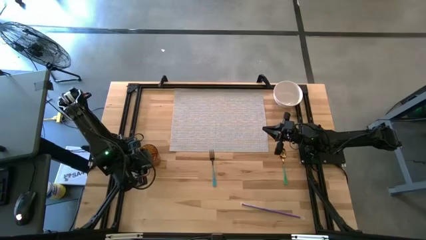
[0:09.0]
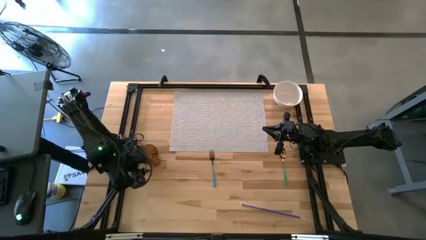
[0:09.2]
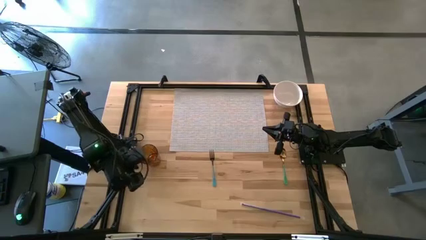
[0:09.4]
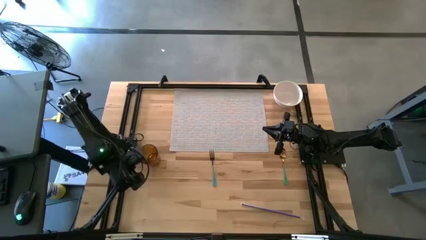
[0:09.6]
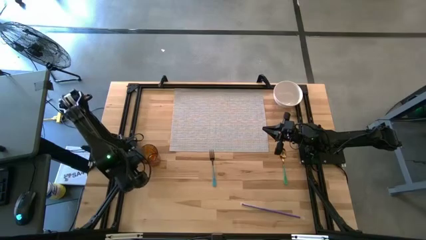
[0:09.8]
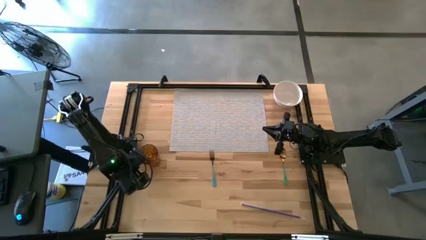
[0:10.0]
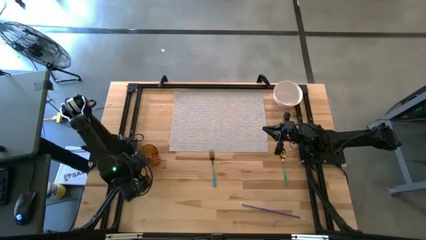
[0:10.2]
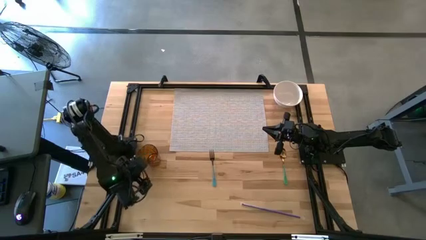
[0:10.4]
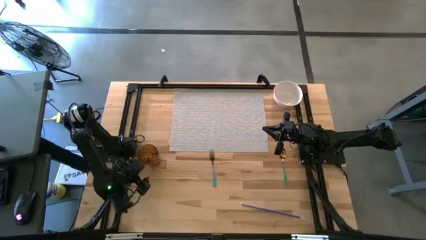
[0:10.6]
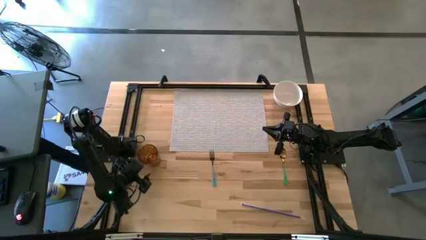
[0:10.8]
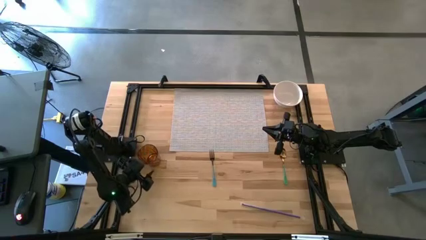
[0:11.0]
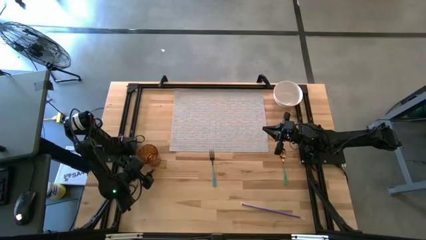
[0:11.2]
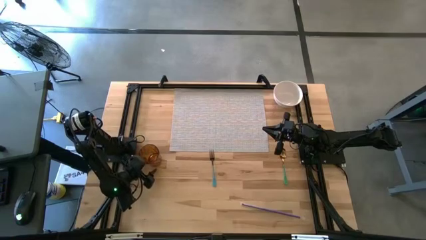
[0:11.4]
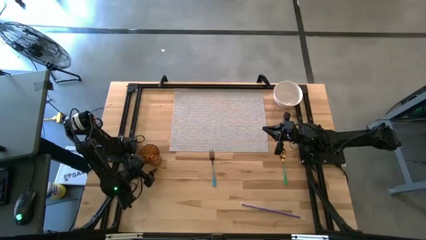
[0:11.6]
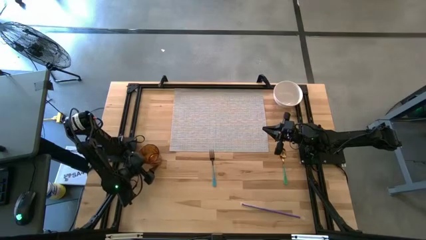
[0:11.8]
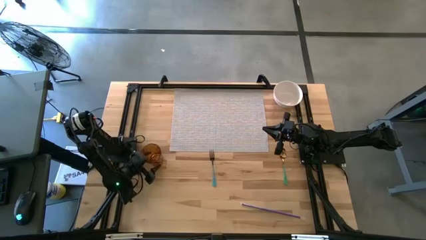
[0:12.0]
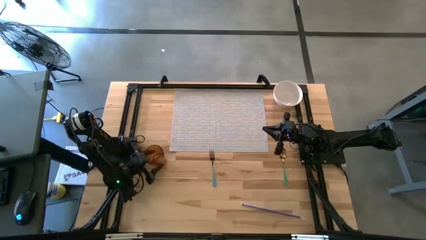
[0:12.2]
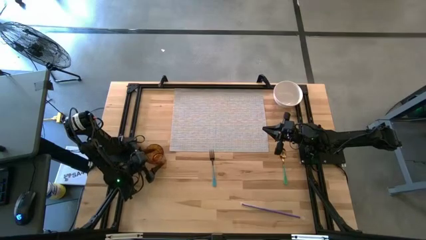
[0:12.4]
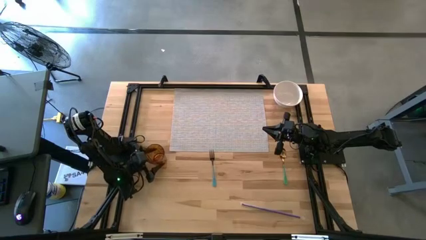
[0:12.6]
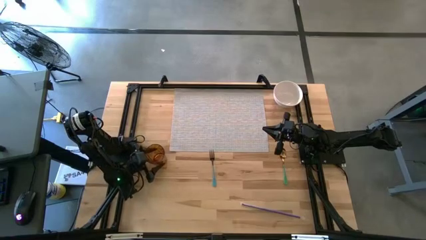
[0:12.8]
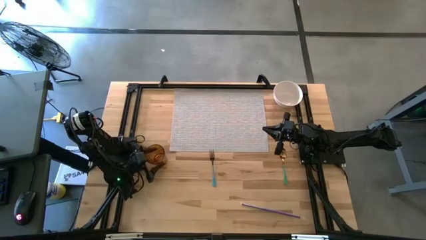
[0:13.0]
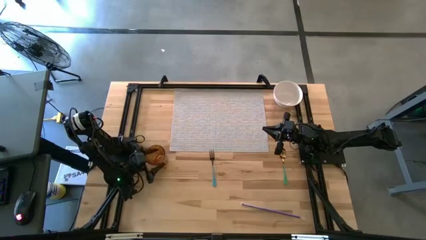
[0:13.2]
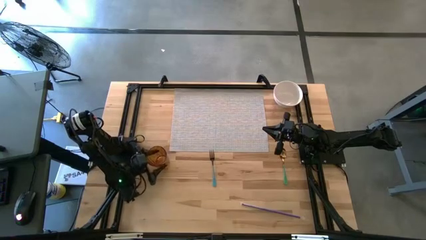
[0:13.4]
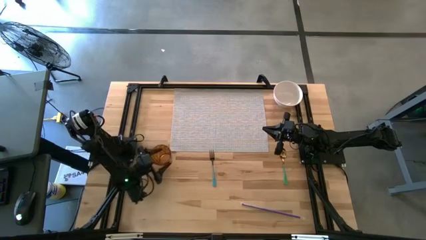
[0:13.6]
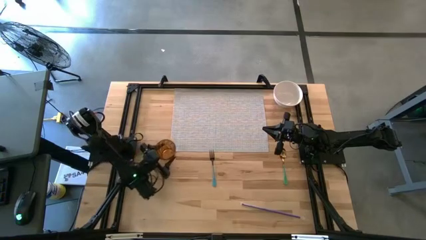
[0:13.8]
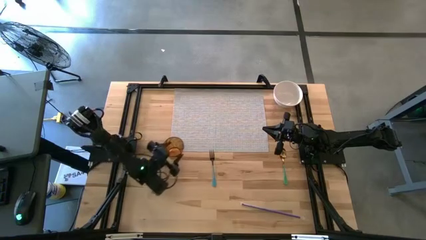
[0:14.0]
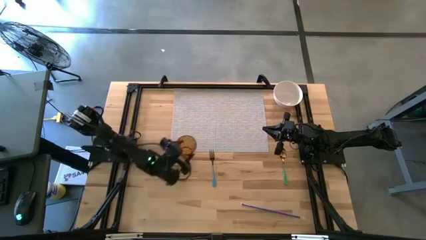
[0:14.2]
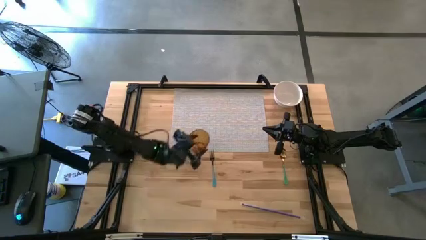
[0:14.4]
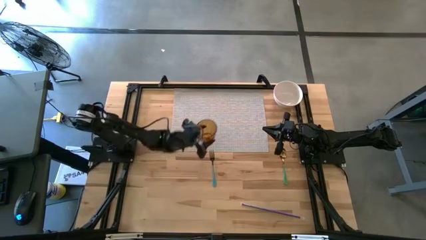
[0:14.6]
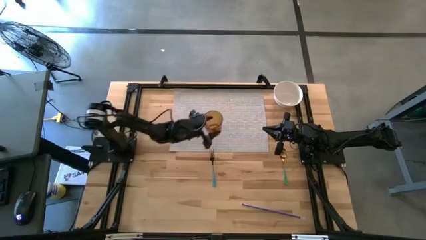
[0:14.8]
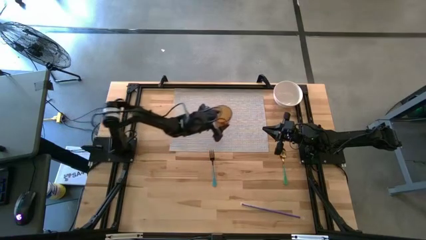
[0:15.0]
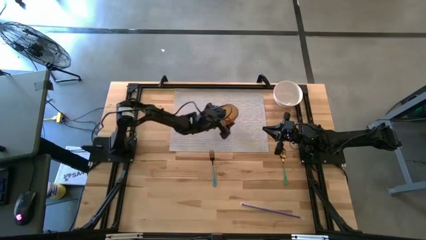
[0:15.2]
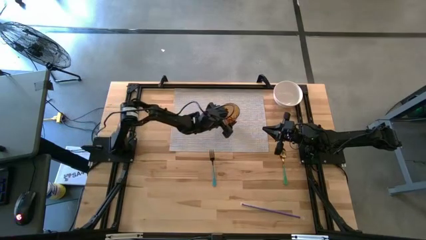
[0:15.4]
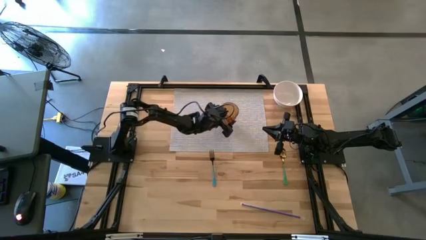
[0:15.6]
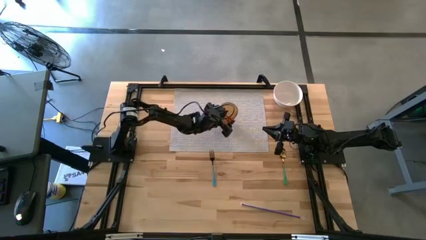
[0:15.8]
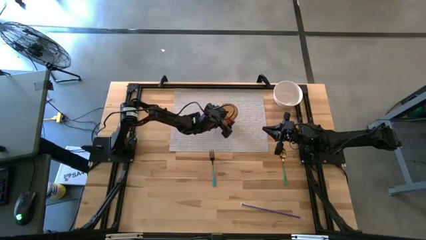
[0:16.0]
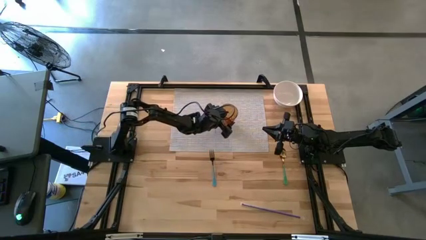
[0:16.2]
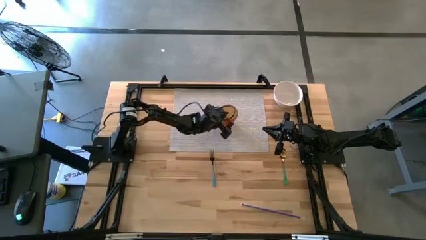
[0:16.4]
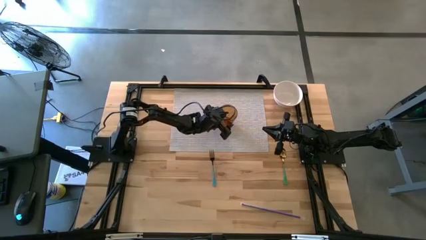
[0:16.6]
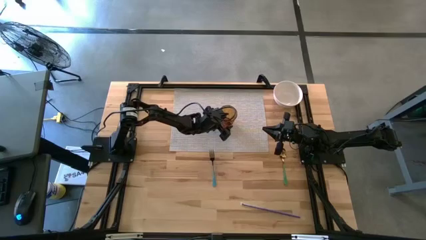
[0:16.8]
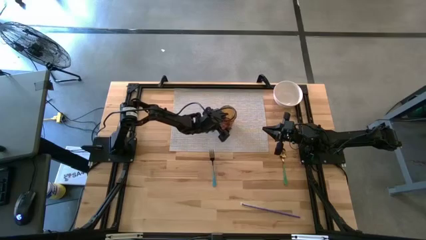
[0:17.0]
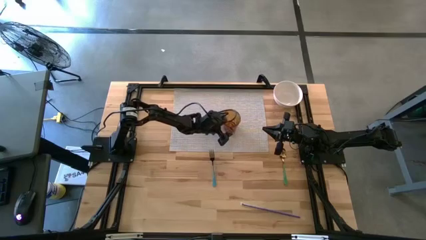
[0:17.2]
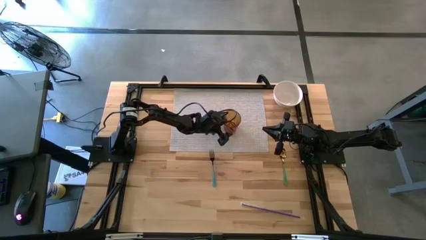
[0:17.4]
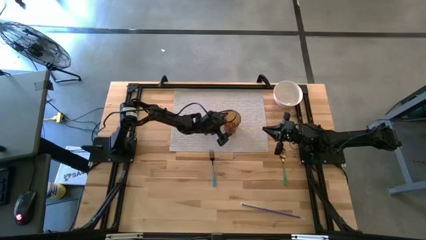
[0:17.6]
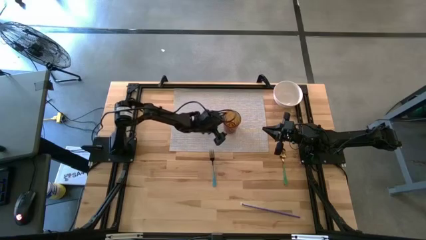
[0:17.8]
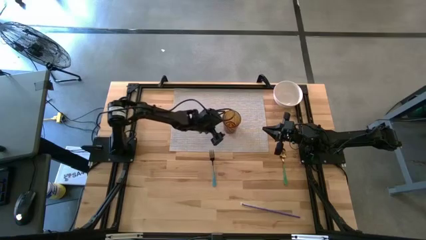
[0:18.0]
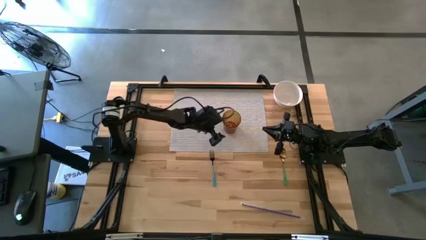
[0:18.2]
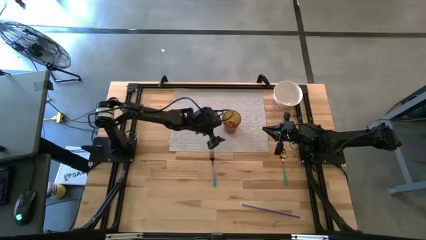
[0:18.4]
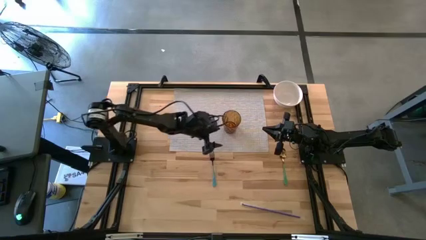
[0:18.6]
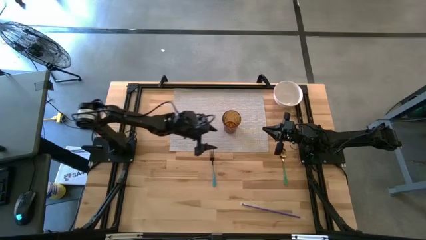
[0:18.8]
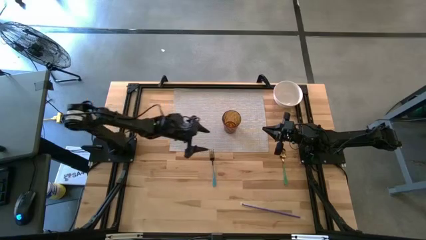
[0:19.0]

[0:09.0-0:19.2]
Task: Pick & Place Utensil
Put the brown cup on the gray mat
